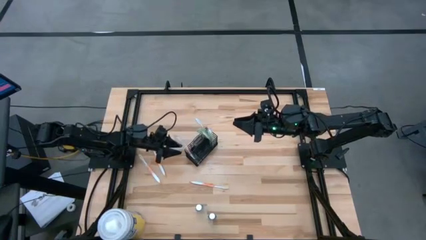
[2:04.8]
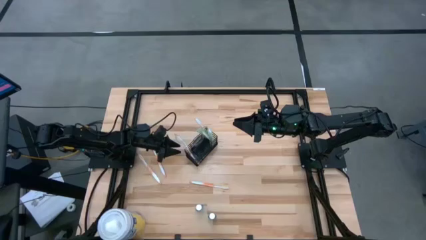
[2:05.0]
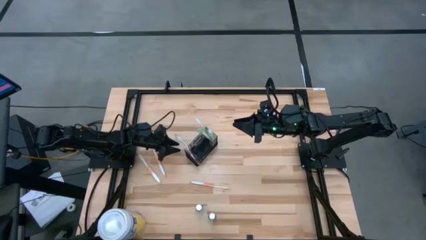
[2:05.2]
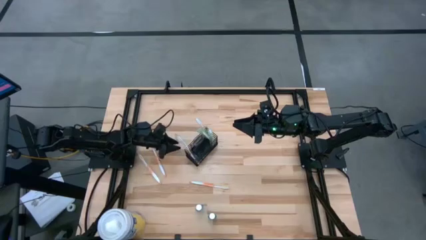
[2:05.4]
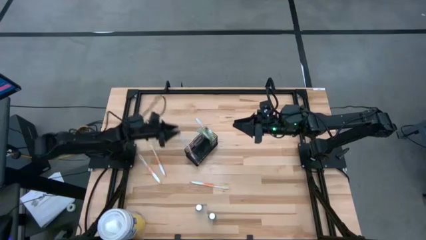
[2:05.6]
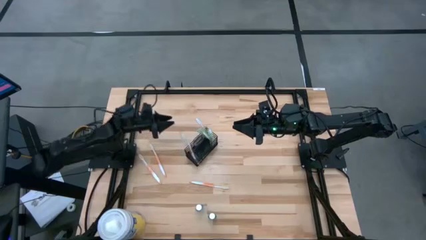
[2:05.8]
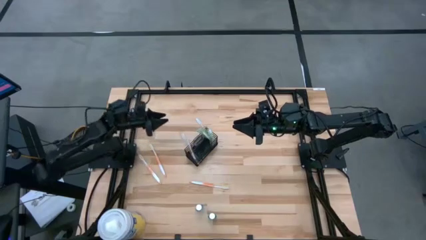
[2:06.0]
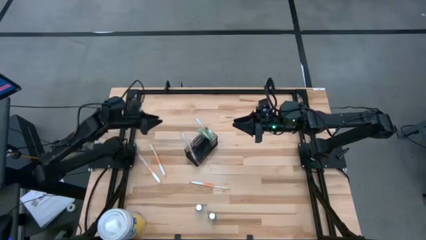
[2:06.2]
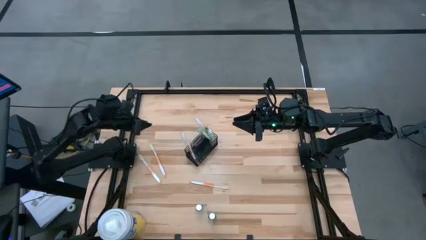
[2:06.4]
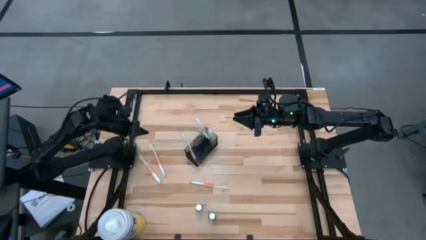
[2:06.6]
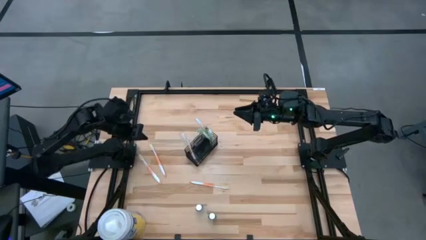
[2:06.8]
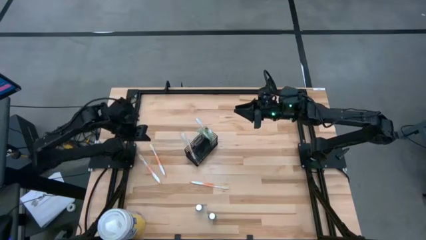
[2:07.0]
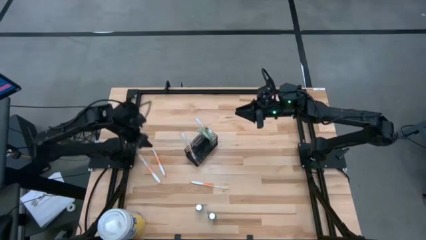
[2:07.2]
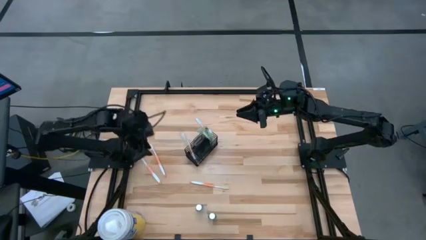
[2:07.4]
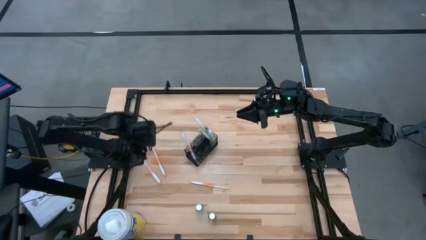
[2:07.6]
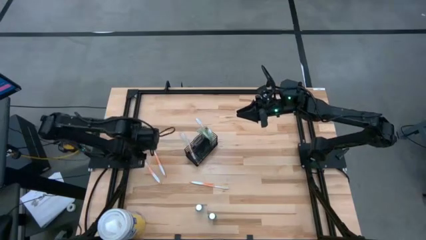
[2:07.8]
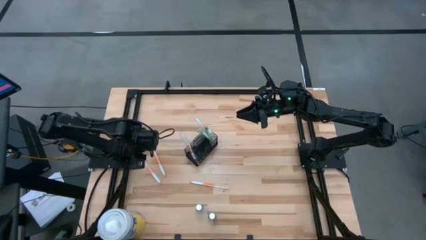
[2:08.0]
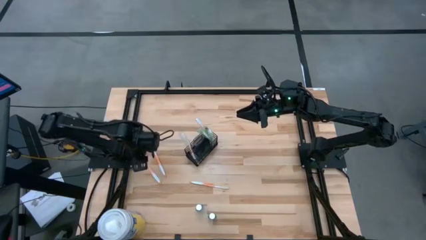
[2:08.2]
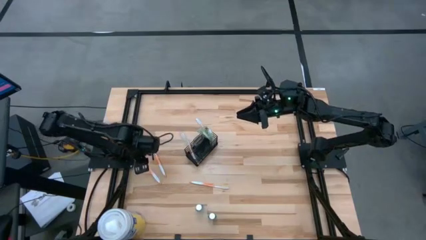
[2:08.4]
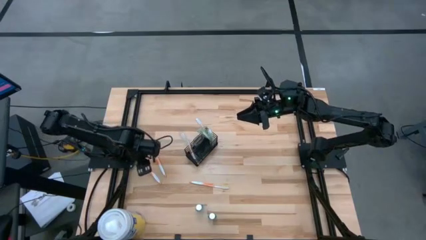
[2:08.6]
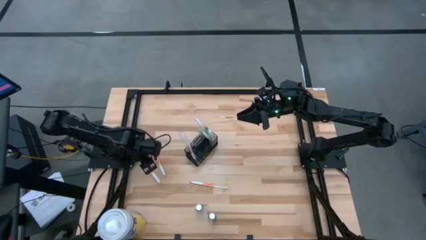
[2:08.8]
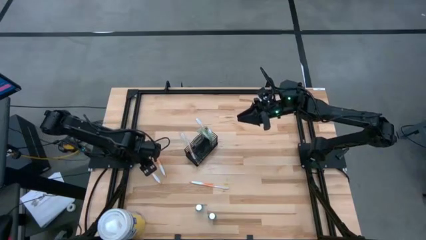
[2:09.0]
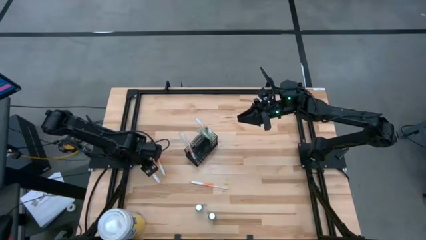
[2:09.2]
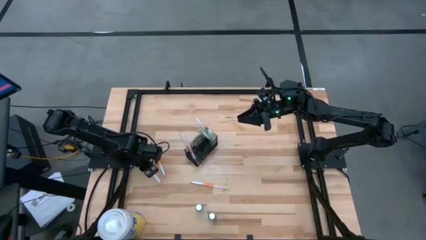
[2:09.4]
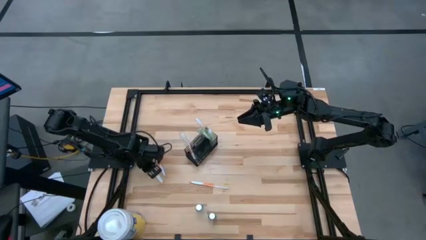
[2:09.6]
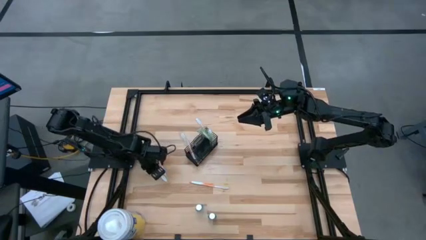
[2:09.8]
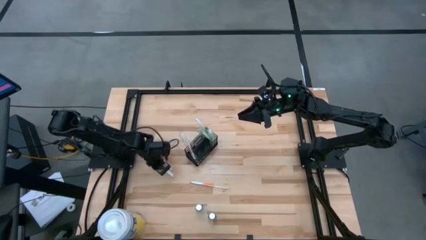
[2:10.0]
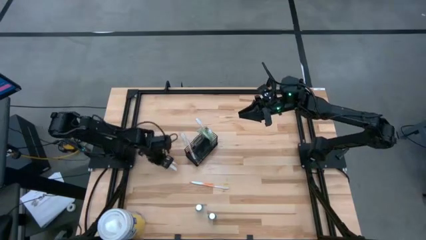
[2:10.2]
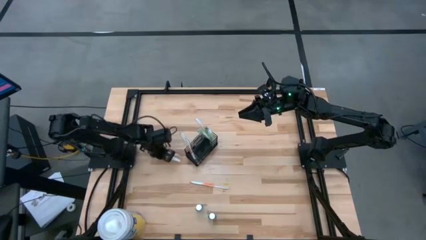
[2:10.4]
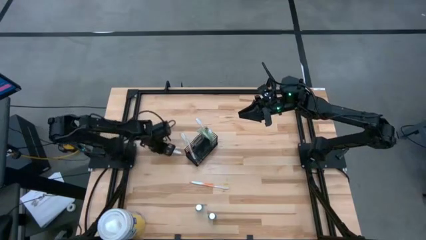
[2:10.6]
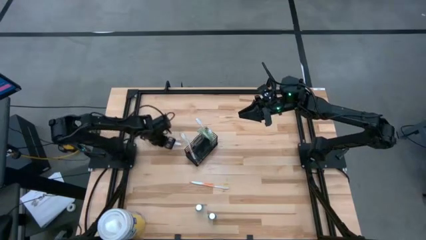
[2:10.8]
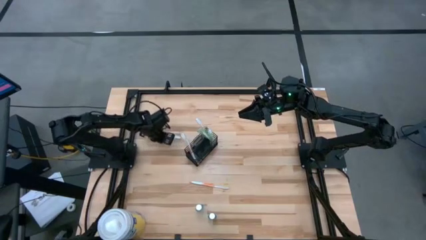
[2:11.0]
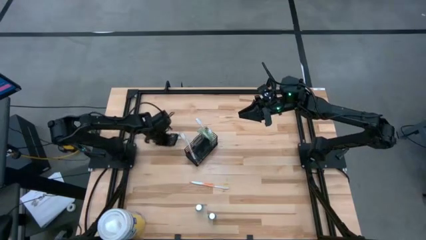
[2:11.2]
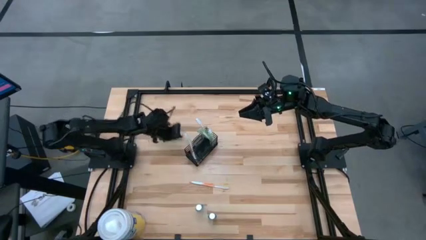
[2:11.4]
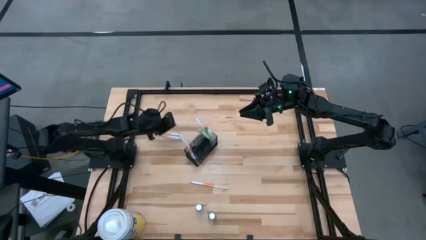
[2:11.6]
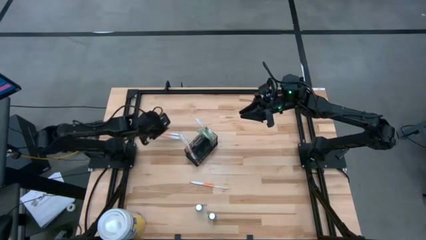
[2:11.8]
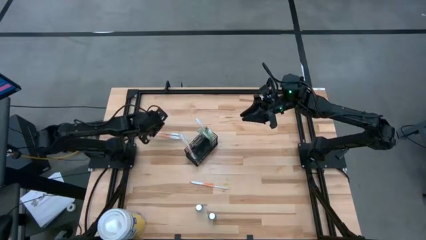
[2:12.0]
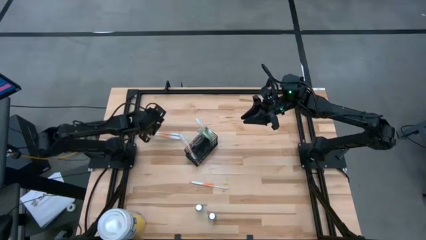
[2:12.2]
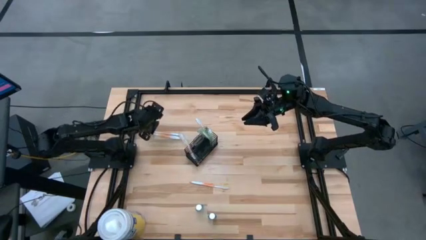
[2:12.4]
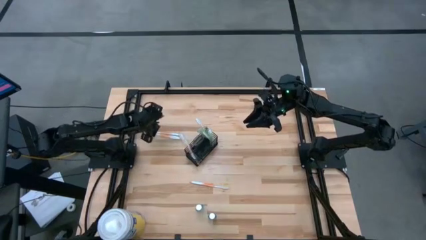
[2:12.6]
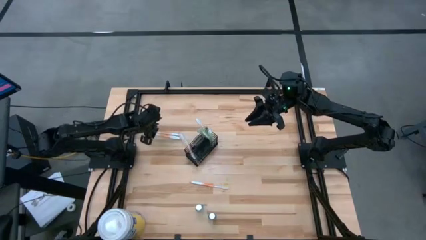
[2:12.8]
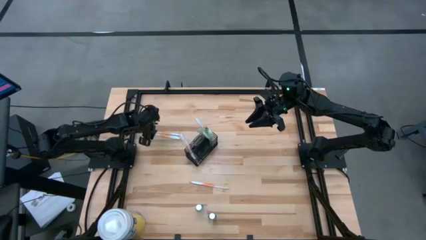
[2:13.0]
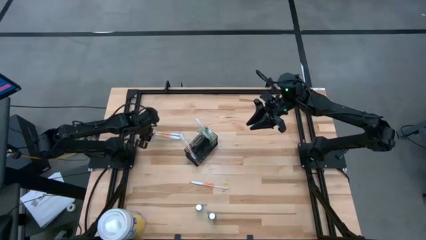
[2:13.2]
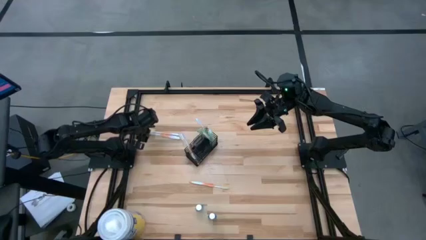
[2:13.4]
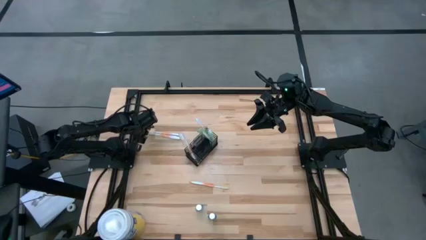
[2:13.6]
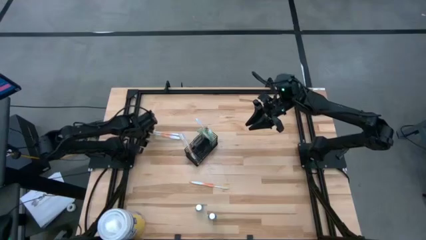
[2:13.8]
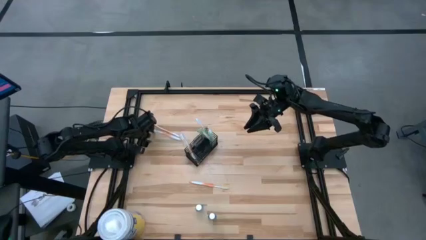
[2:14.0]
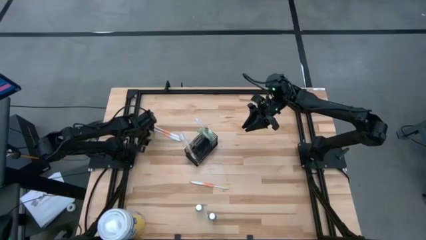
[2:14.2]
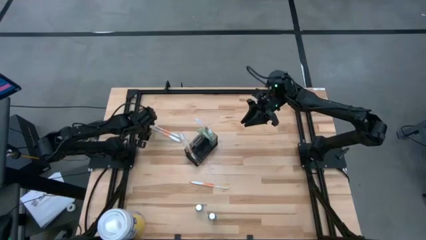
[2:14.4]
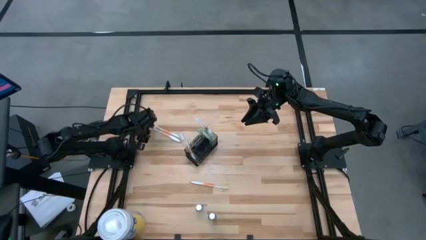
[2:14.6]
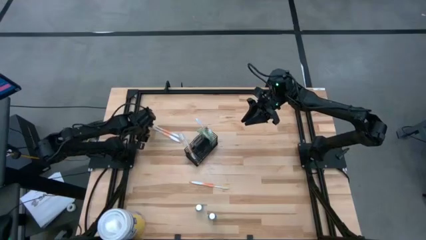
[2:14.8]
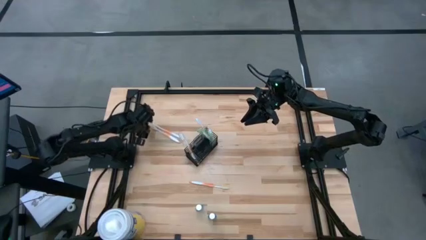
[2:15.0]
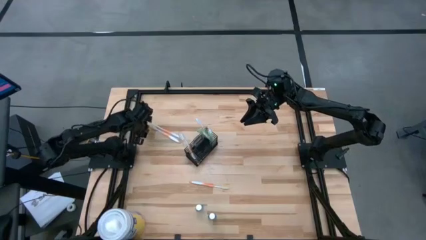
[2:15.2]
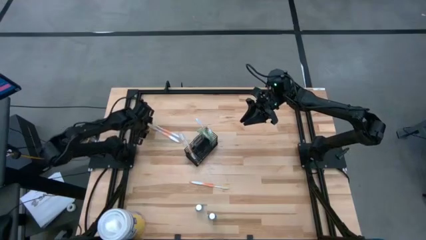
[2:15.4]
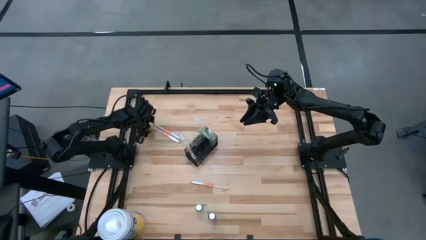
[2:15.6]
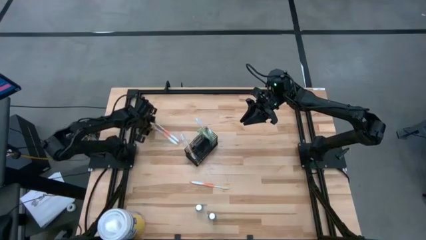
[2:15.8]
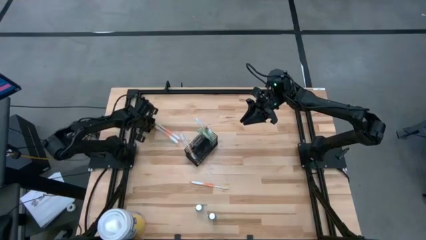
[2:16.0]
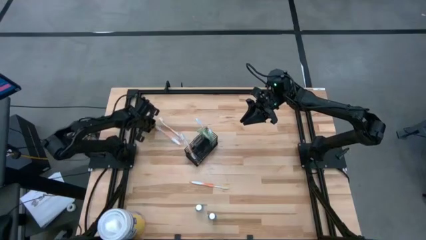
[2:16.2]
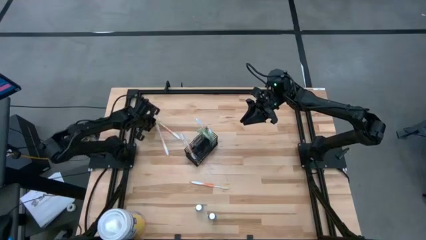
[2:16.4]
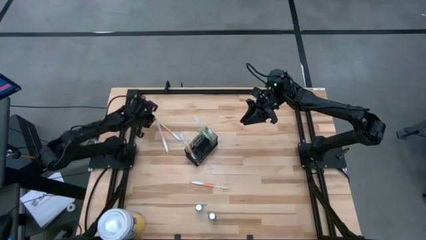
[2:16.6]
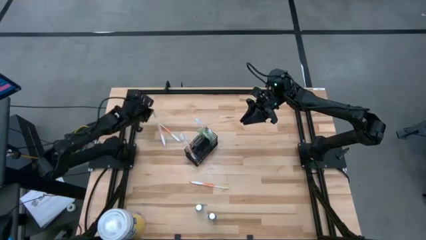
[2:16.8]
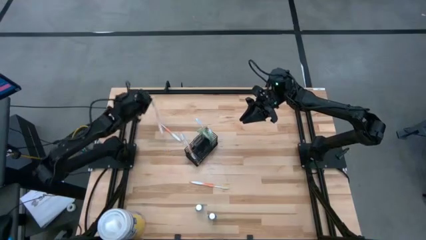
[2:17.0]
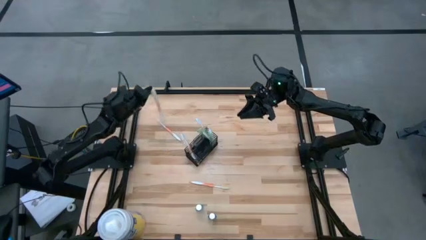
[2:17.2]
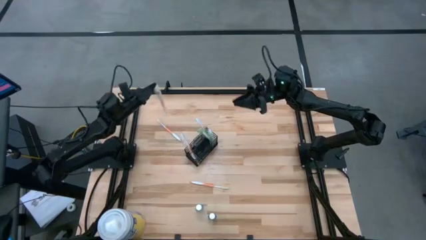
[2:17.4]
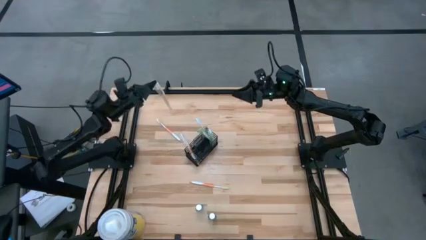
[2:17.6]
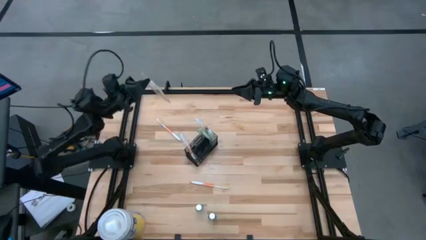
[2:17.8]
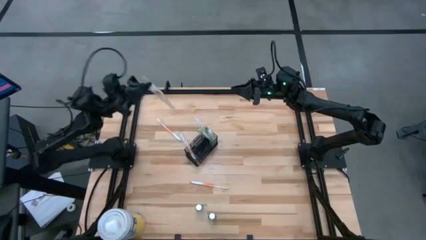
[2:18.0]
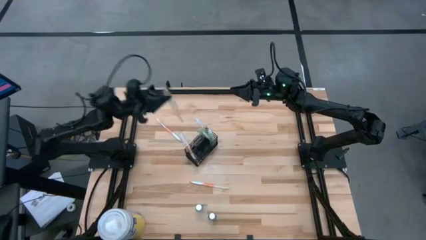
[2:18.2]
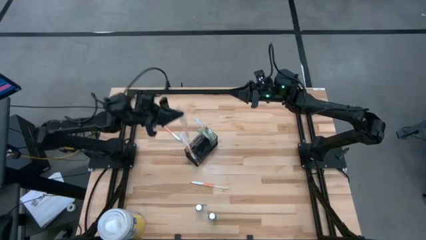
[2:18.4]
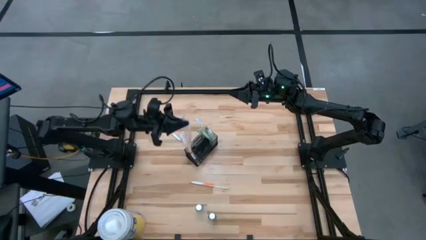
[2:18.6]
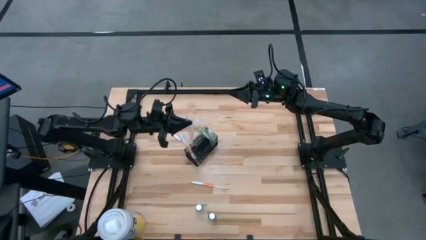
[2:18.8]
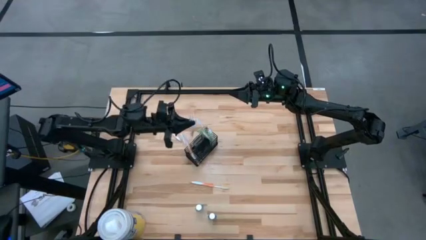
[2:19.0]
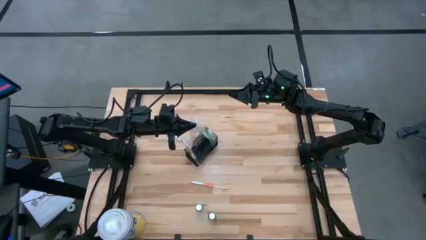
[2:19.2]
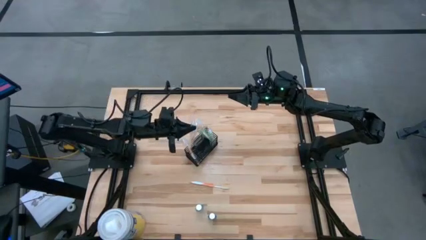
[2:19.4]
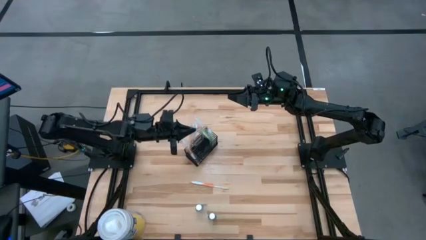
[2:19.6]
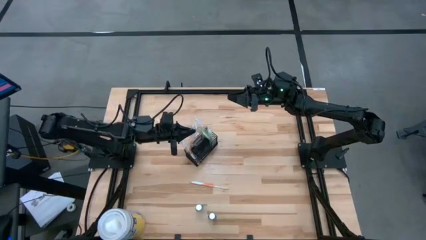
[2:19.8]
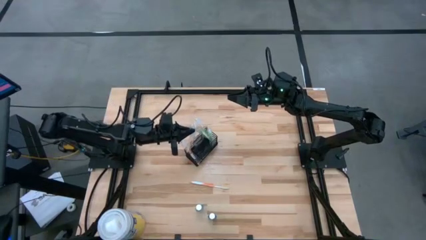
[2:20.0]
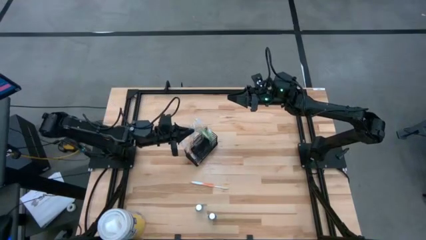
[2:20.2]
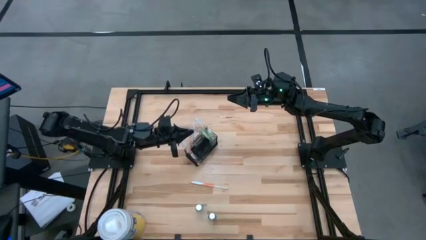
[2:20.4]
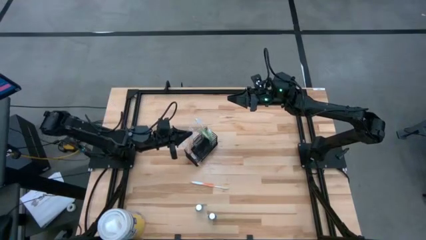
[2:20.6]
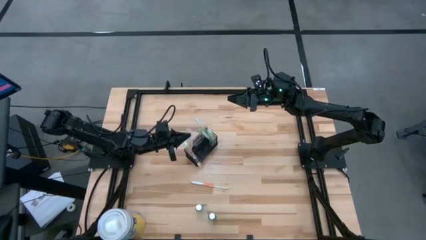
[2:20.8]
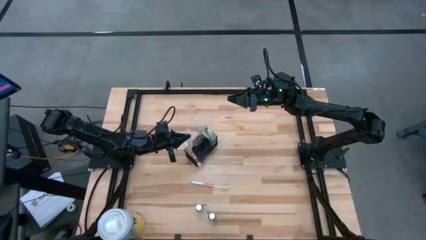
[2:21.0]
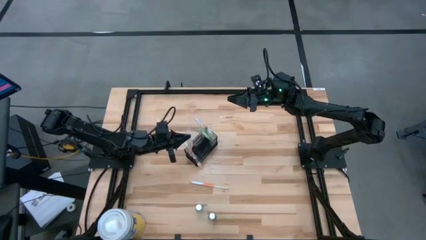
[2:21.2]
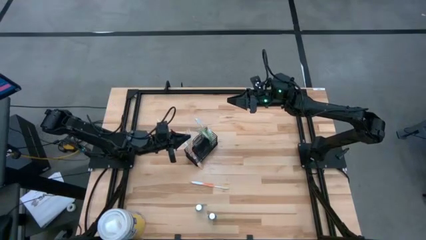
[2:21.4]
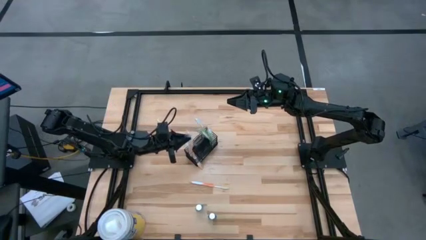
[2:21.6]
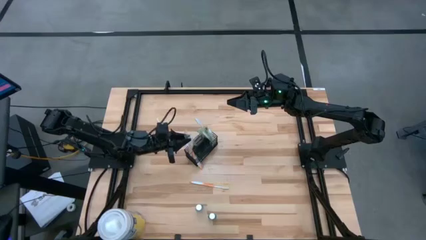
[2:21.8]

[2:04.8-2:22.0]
Task: Pick & Place toothbrushing station
Put the left orange toothbrush into the wire organizer
